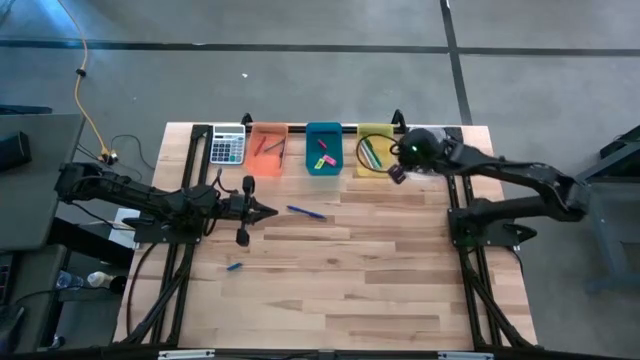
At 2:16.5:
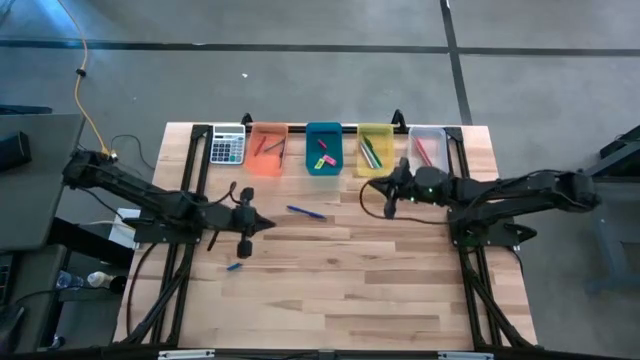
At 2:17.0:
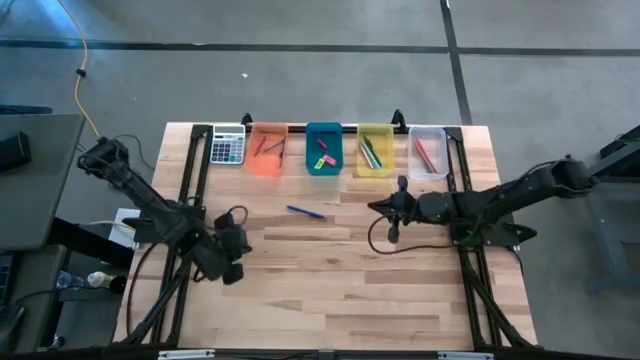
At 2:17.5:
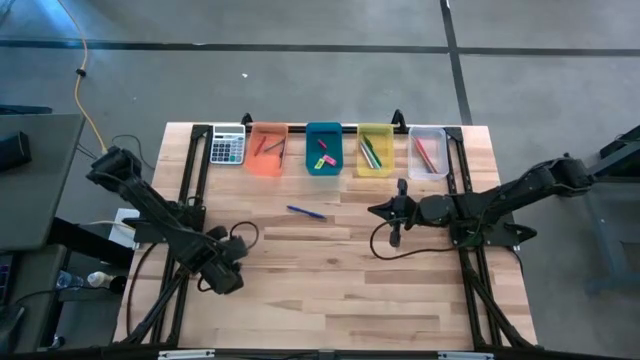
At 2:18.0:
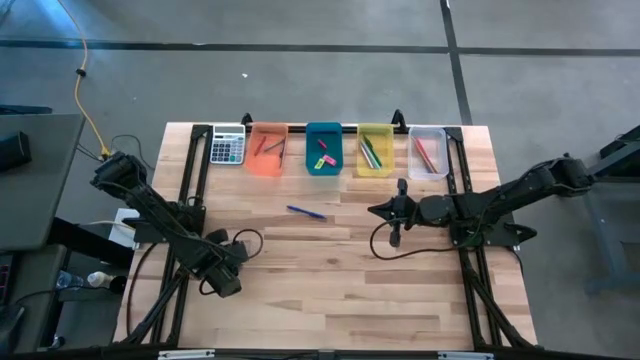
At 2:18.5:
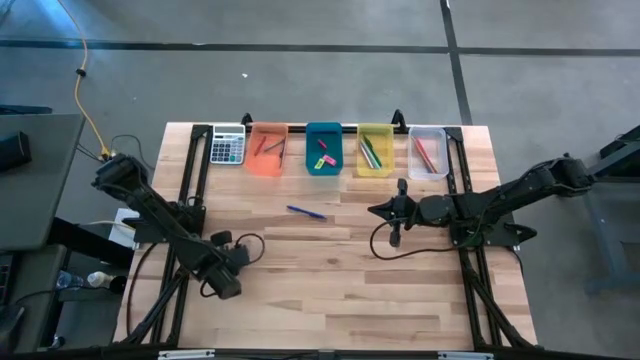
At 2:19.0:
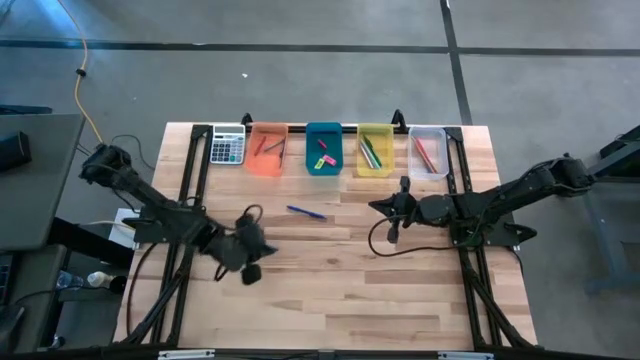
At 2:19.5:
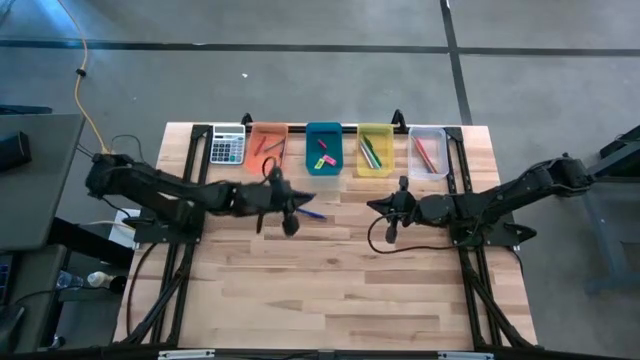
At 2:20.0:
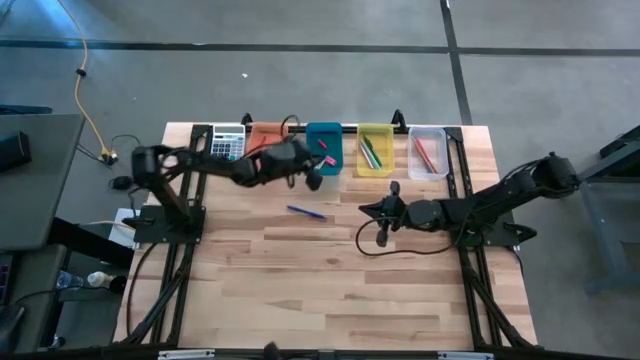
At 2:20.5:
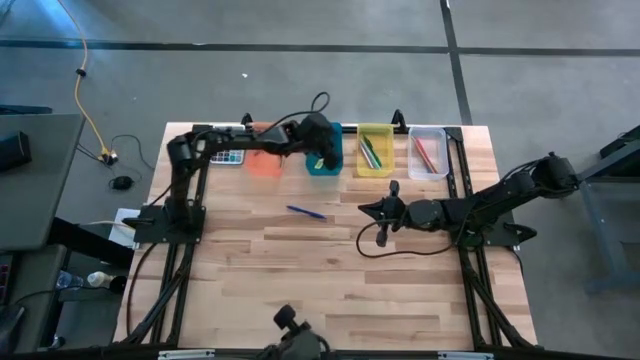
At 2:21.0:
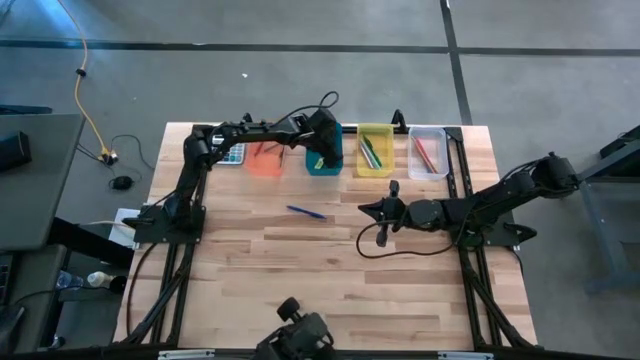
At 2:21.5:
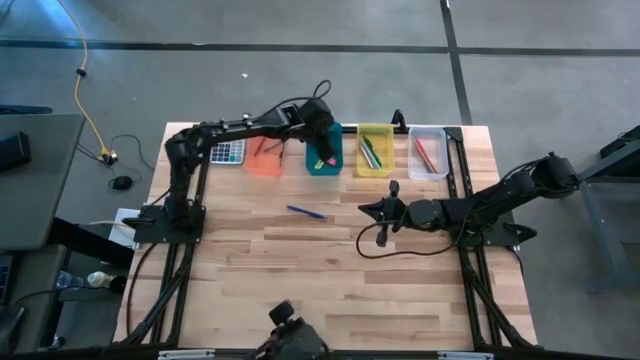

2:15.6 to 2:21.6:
Task: Sort crayons/erasers/pens/pencils in bins
Put the blue eraser into the blue bin

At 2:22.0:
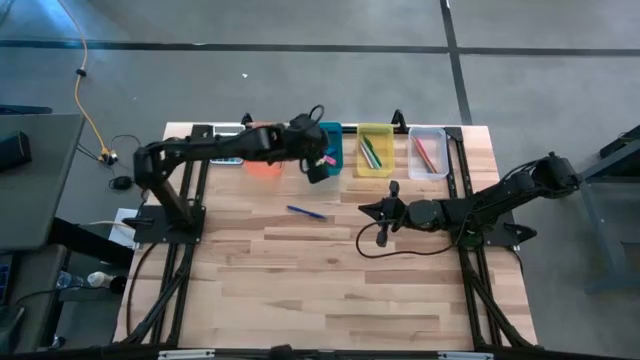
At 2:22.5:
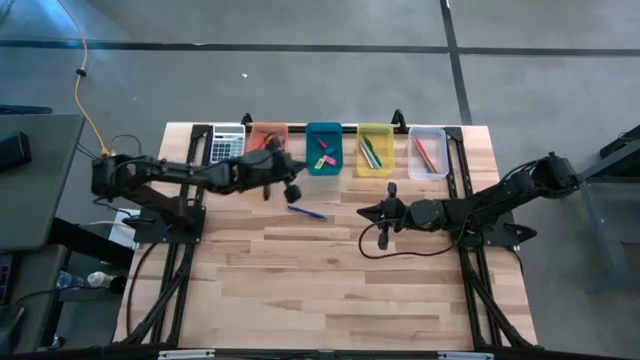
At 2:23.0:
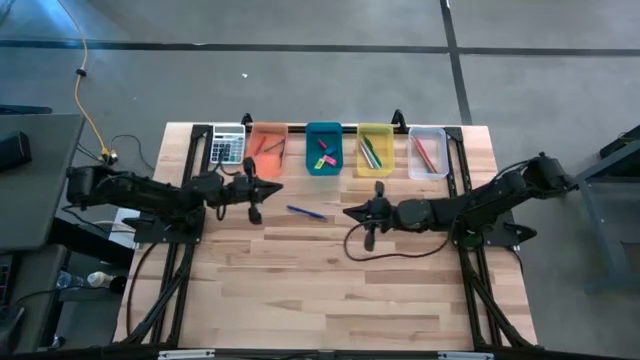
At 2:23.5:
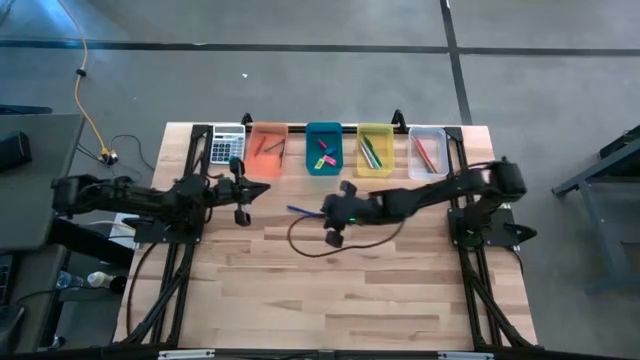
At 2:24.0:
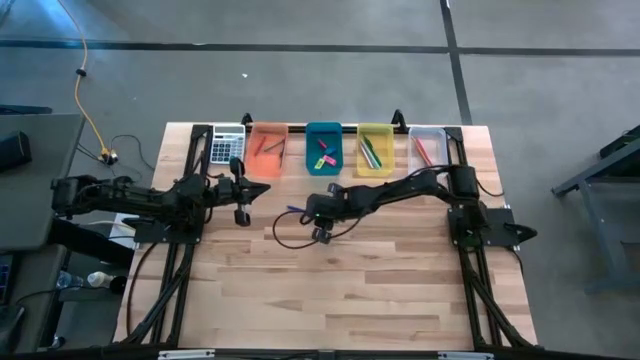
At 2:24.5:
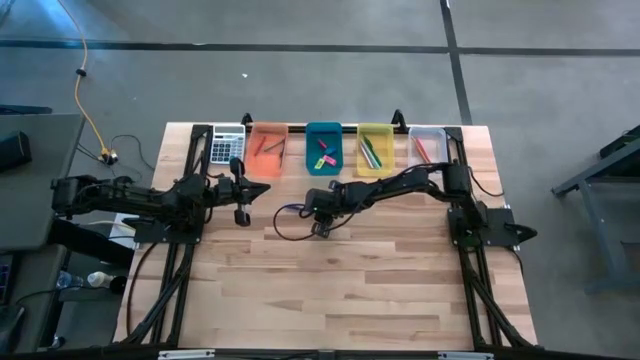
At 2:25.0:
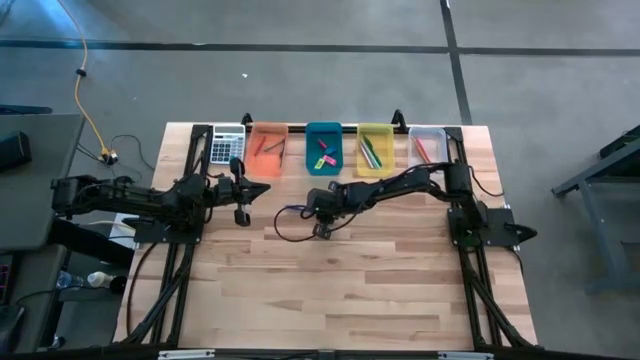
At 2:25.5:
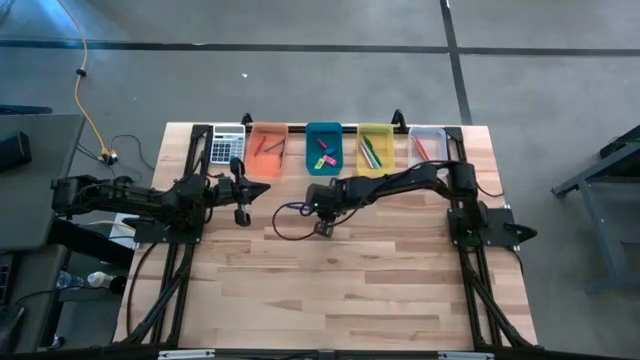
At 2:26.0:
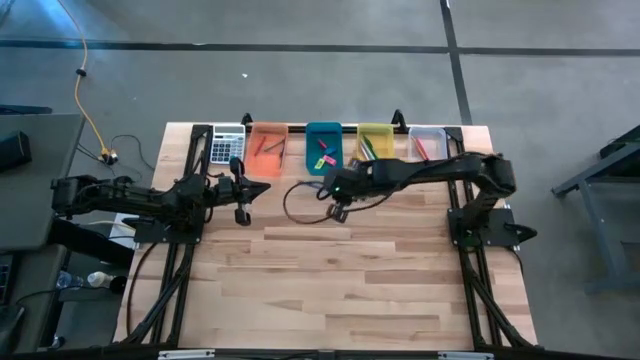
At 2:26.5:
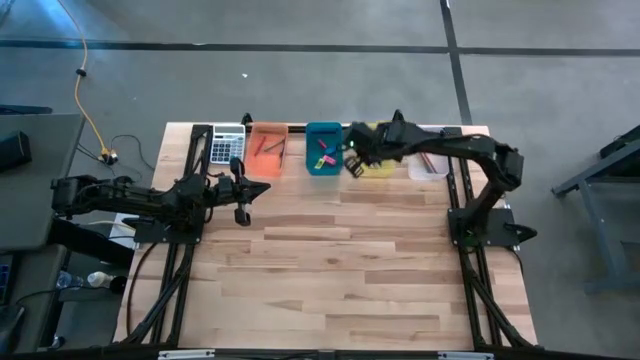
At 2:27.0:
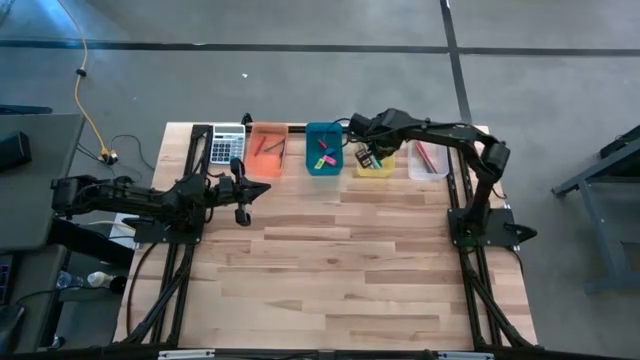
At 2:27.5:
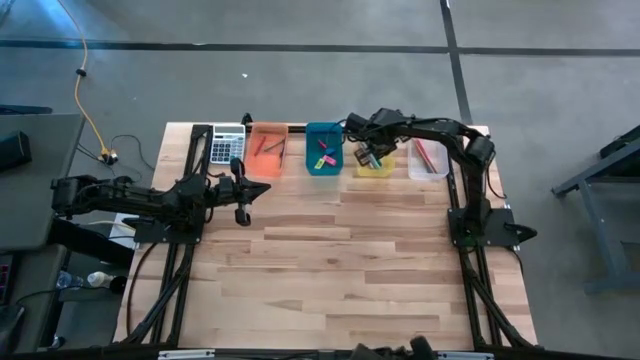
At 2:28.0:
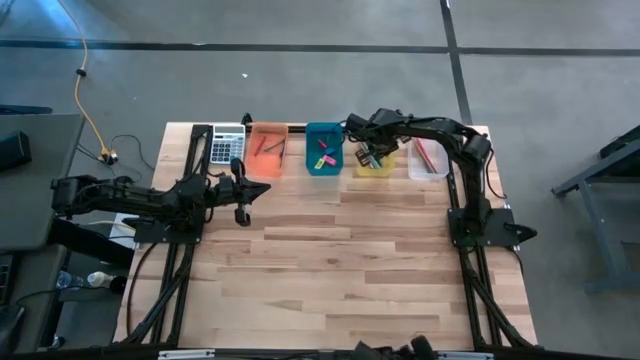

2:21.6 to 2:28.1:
Put the blue ballpen into the yellow bin

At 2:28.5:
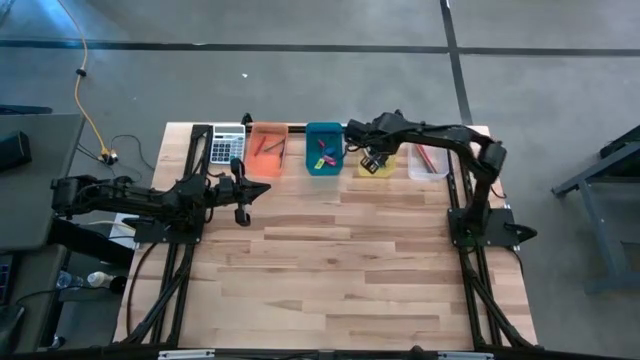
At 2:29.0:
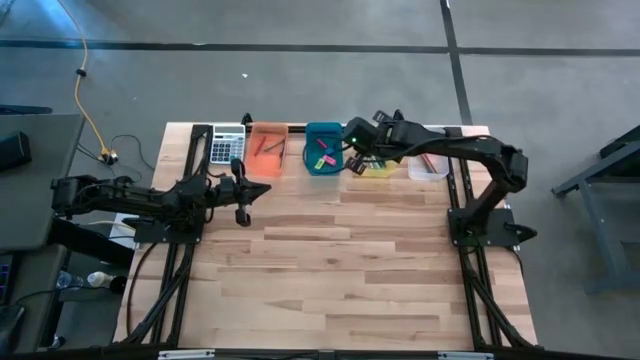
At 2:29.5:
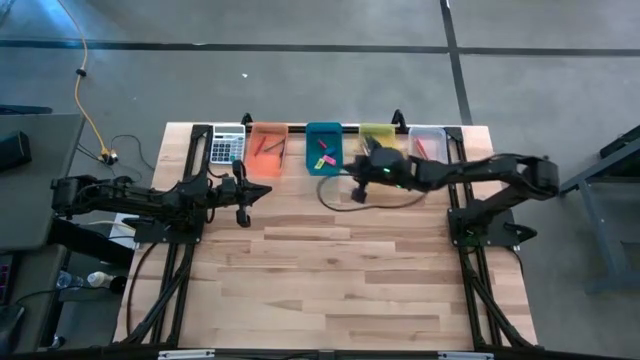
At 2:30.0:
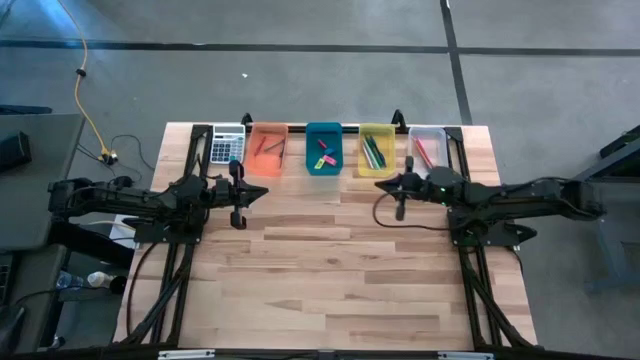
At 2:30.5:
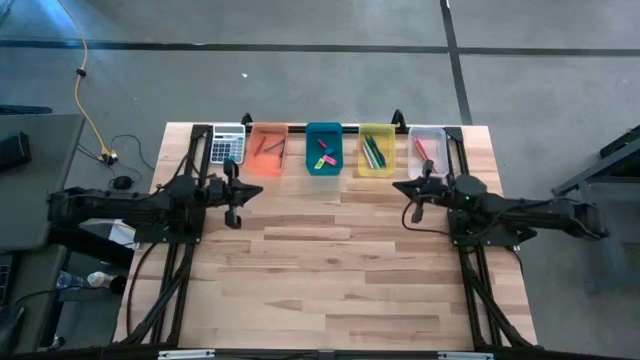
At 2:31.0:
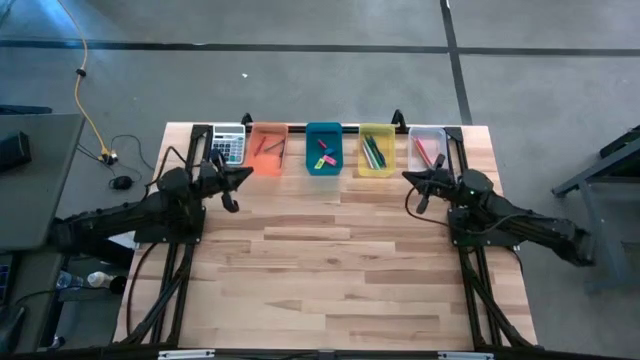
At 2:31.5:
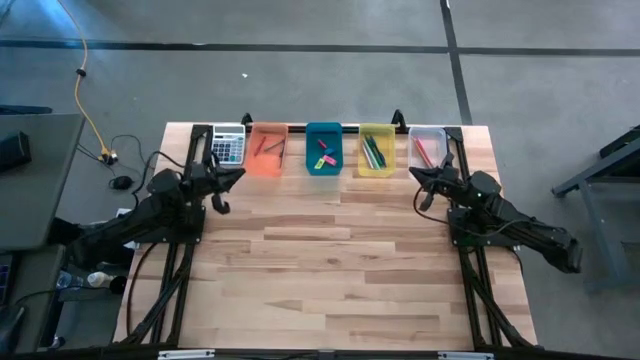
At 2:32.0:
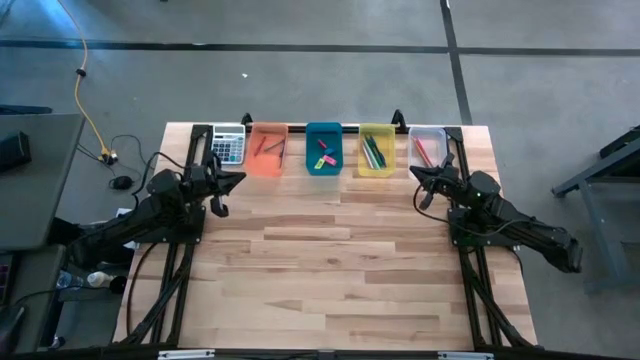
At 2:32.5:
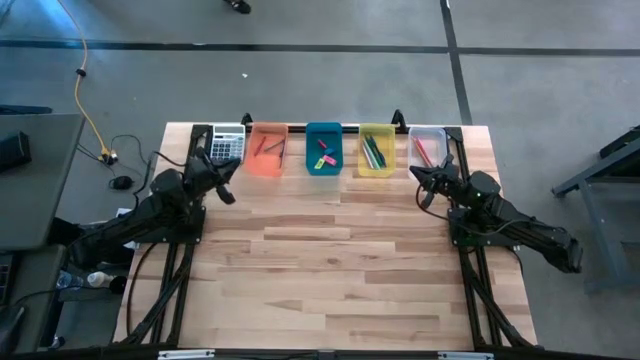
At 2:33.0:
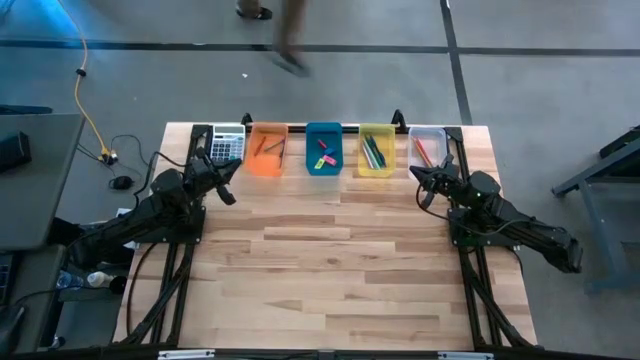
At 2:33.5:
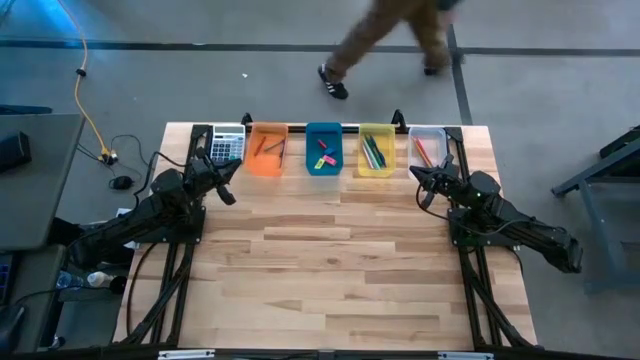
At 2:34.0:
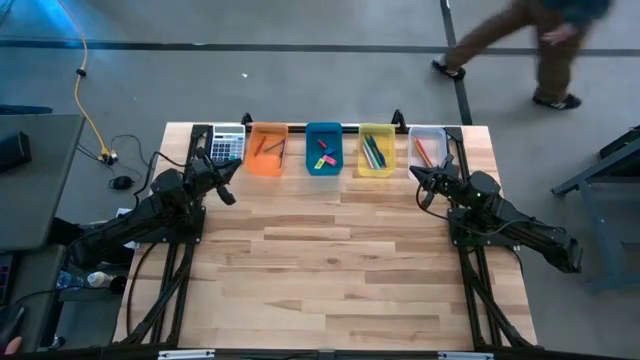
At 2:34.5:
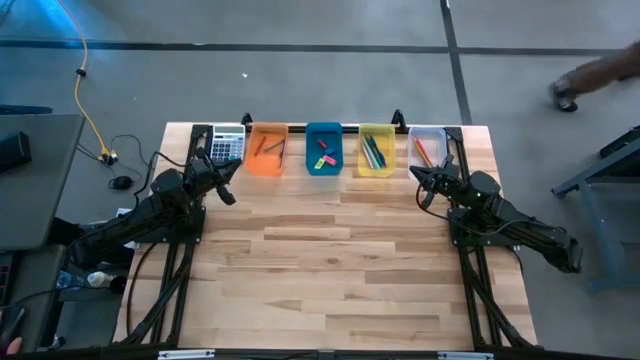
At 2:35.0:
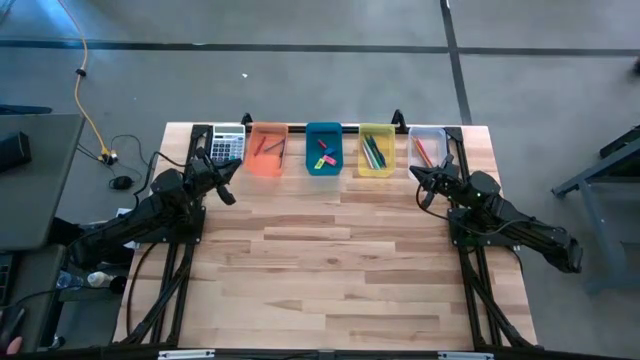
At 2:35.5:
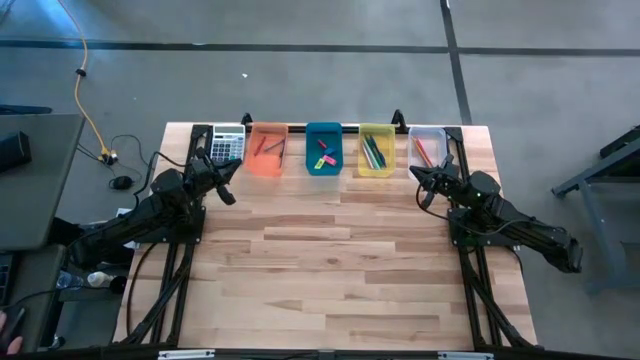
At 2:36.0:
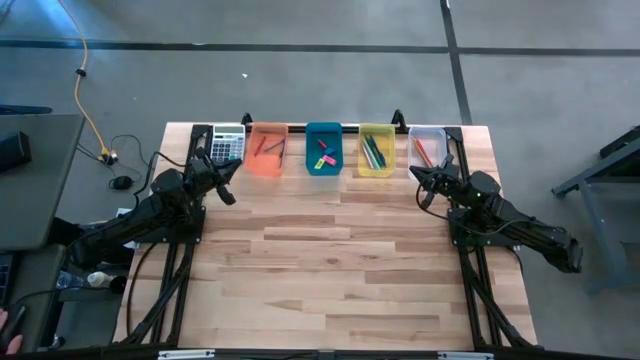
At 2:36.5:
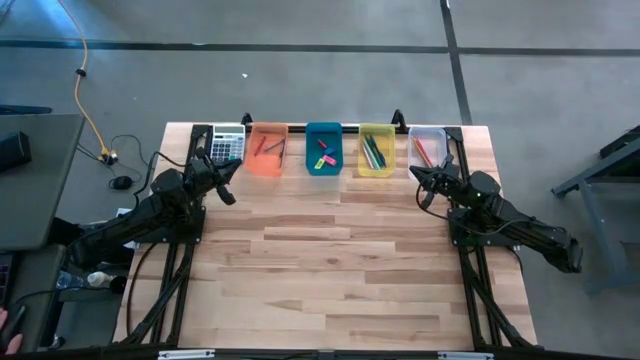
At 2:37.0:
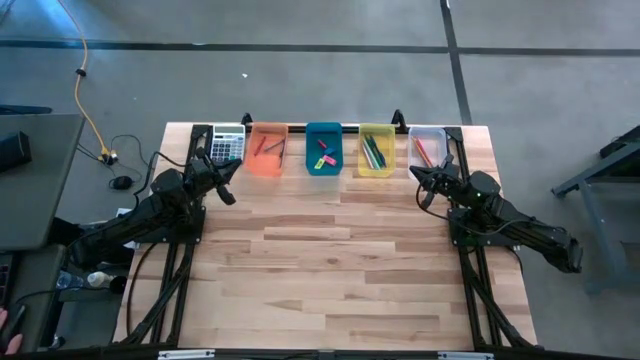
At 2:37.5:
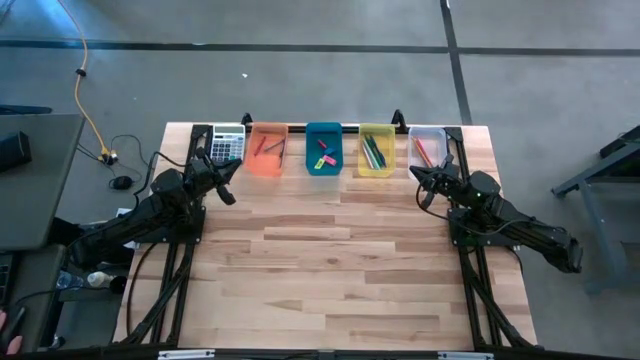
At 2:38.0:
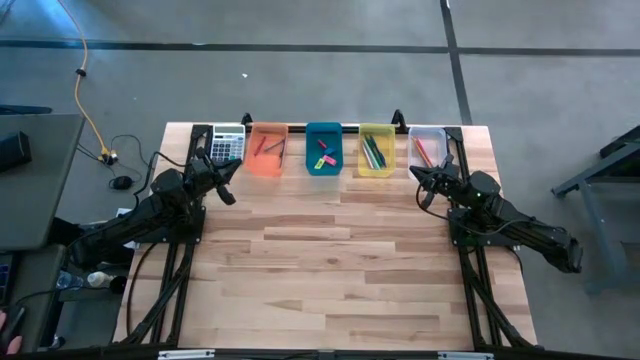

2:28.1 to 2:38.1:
Return to Home Position
